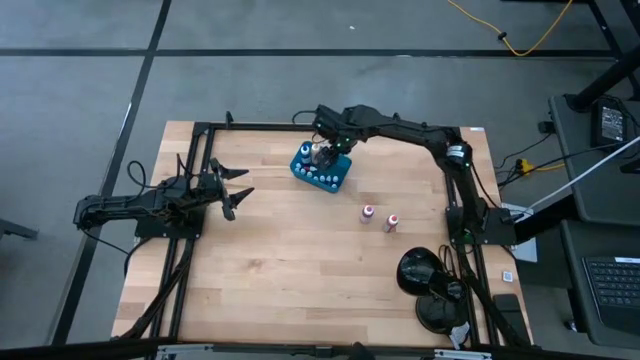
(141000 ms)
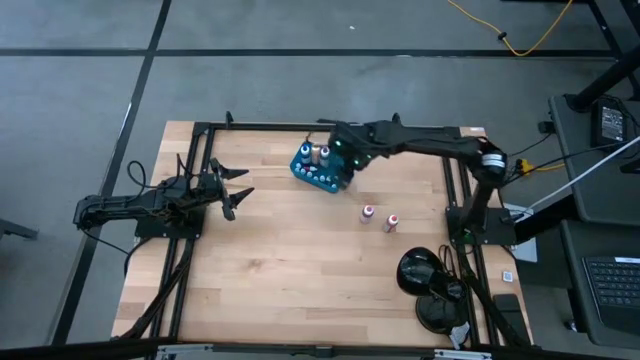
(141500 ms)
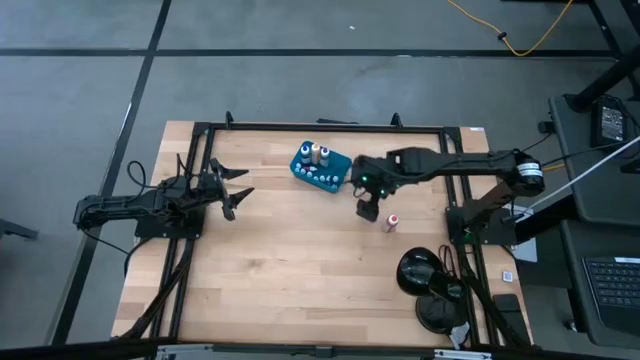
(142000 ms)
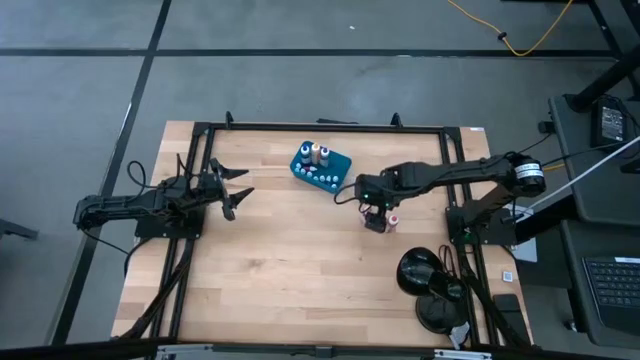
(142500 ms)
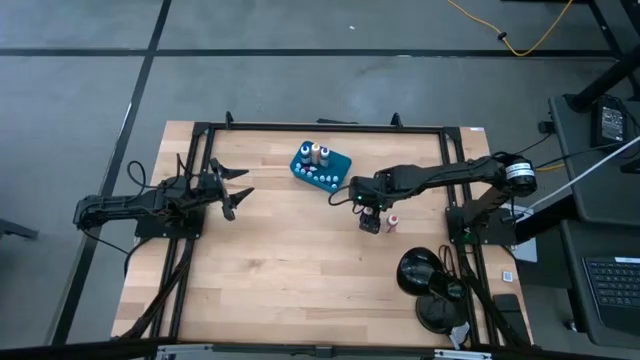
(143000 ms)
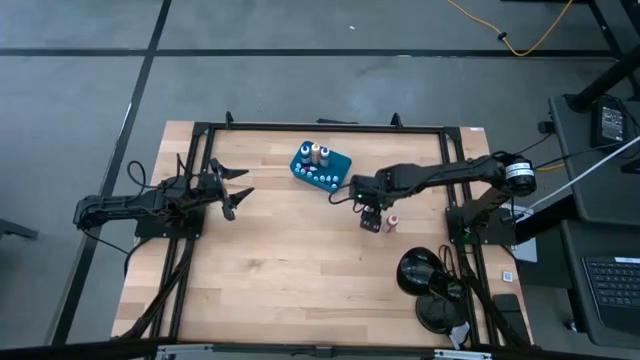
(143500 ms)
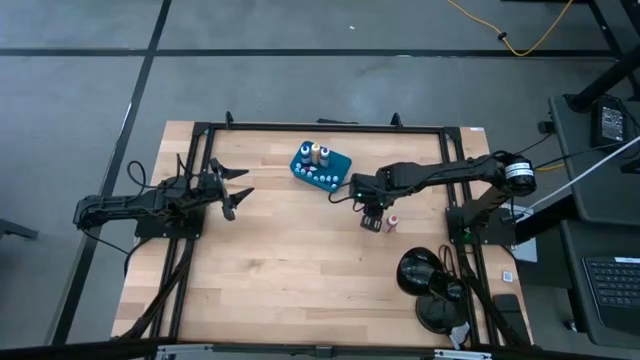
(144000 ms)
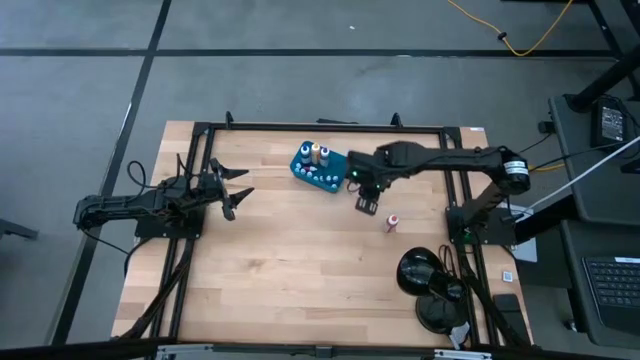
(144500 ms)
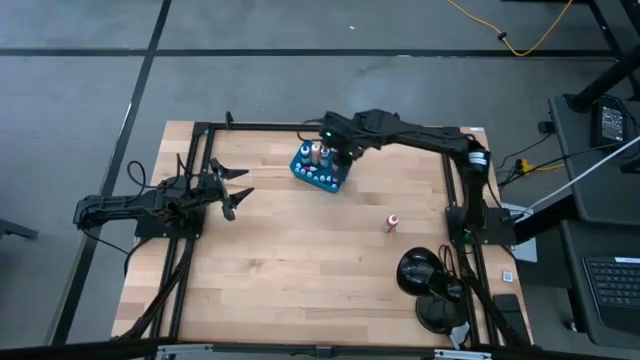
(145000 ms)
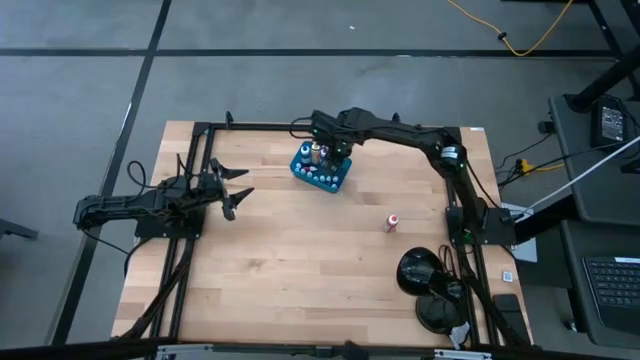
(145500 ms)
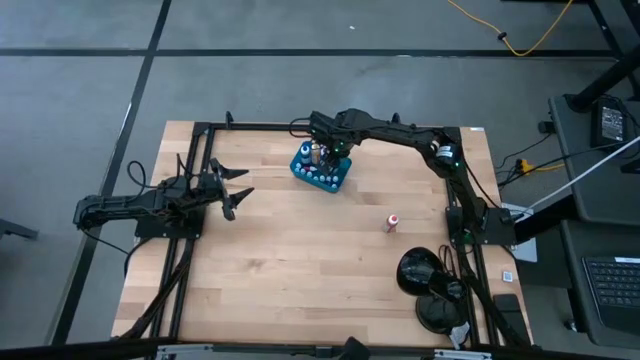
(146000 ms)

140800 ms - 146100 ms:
Task: Pick & Place food coloring
Put the large pink food coloring bottle into the blue bin

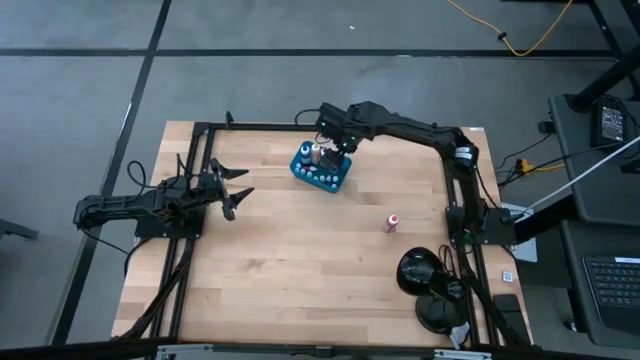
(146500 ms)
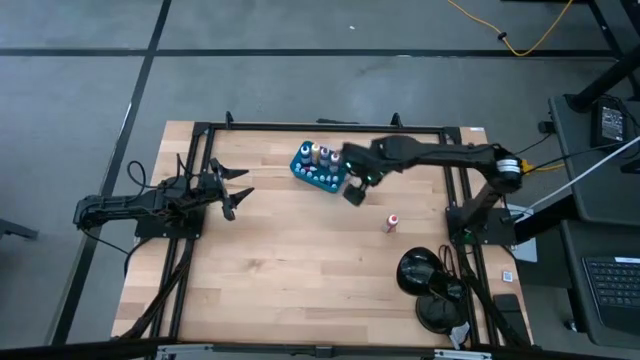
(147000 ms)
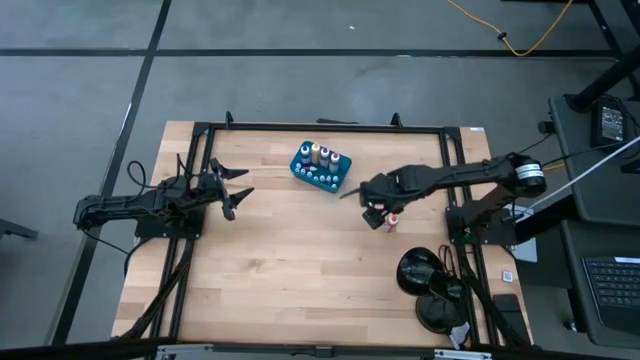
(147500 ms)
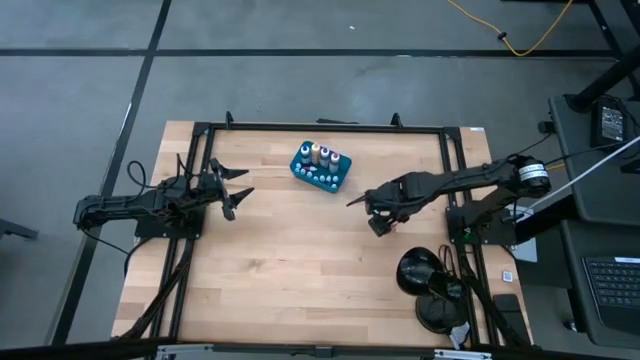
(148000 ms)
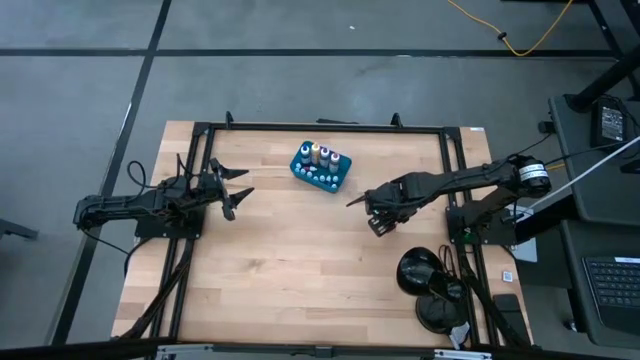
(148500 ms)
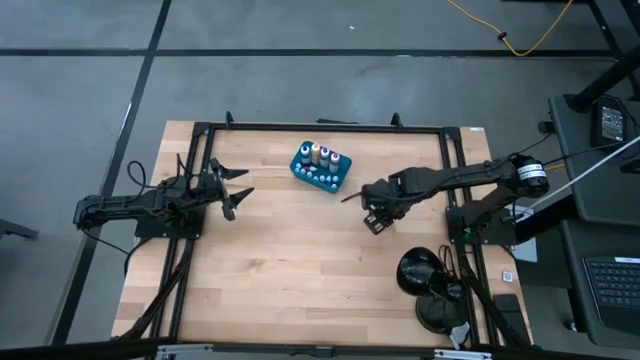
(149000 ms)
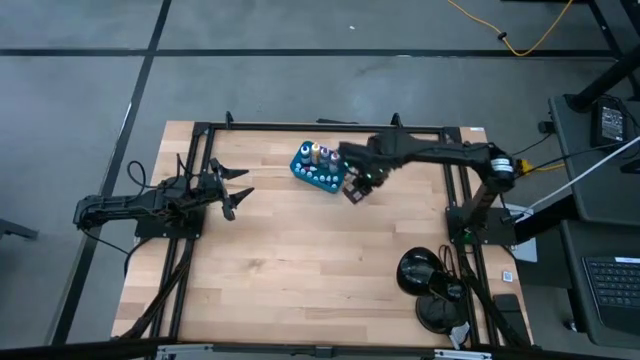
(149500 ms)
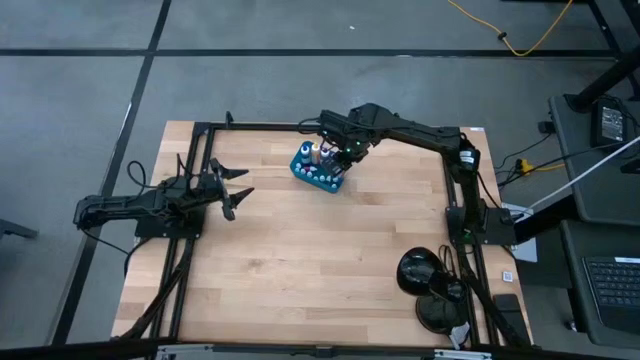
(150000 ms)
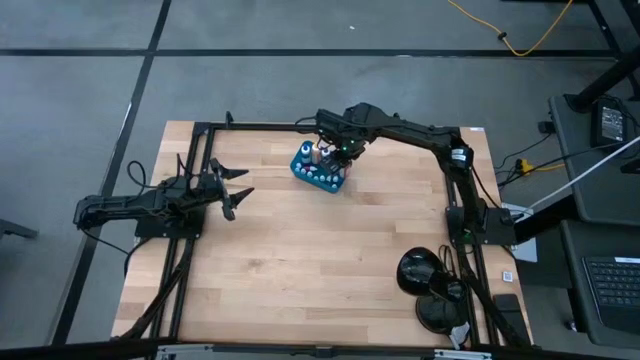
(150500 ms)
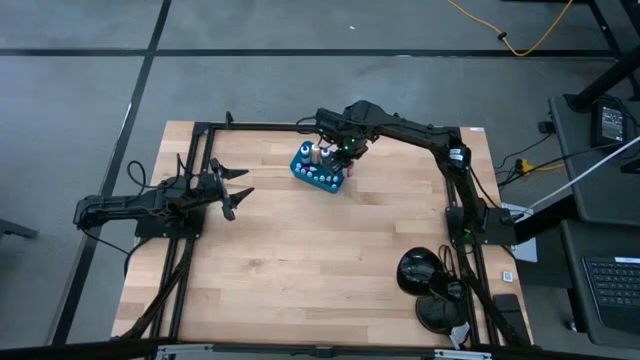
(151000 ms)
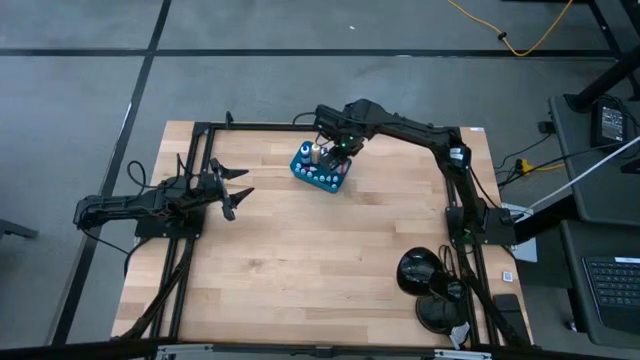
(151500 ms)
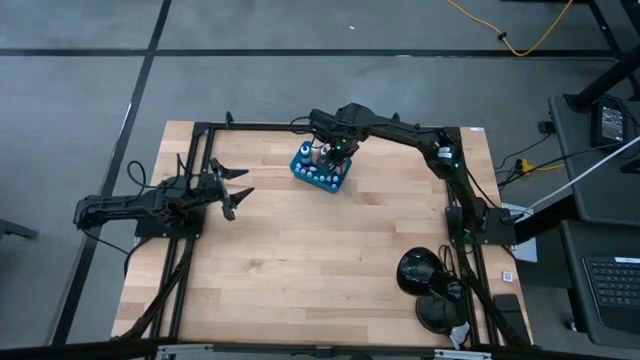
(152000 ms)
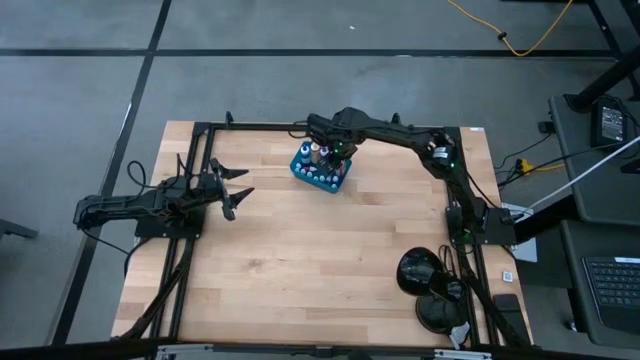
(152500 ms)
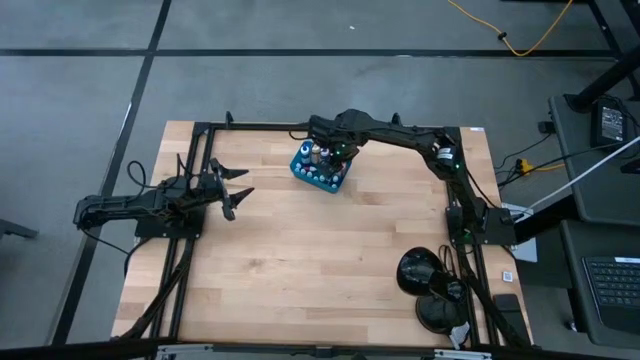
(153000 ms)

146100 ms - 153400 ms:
Put the large orange food coloring bottle into the blue bin

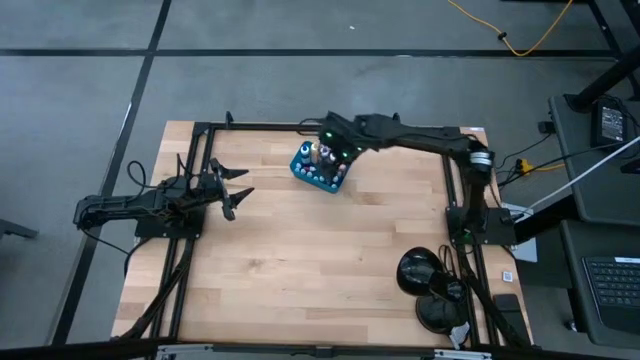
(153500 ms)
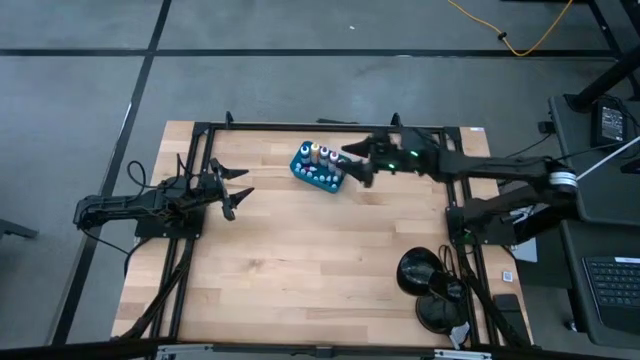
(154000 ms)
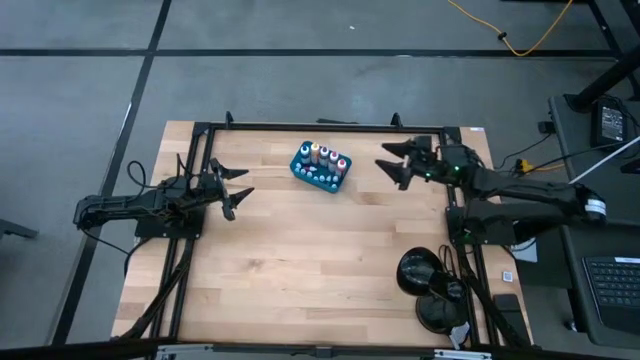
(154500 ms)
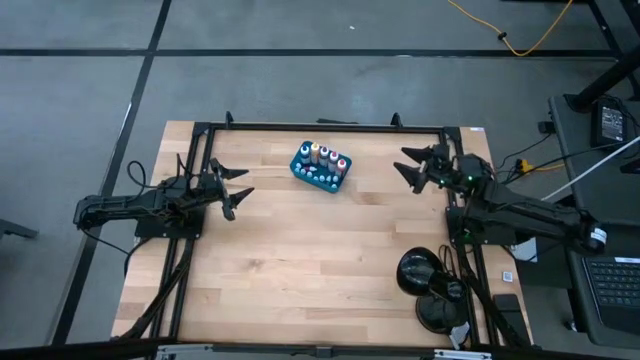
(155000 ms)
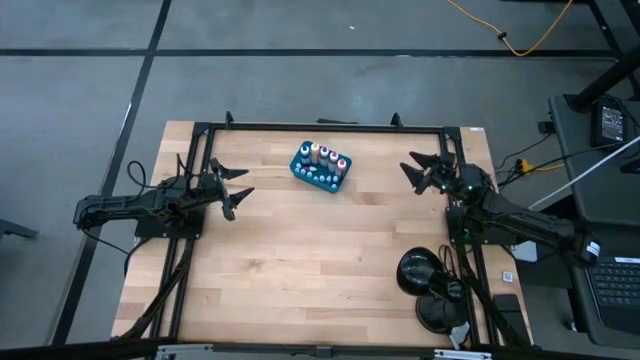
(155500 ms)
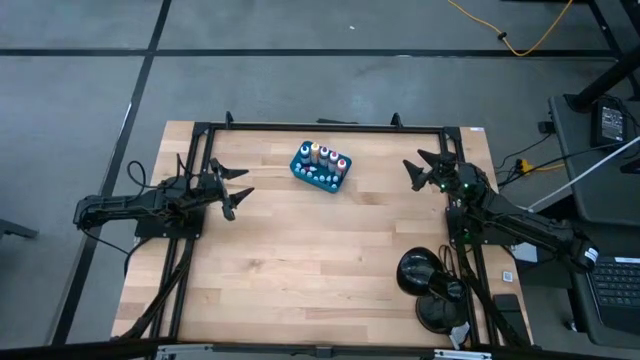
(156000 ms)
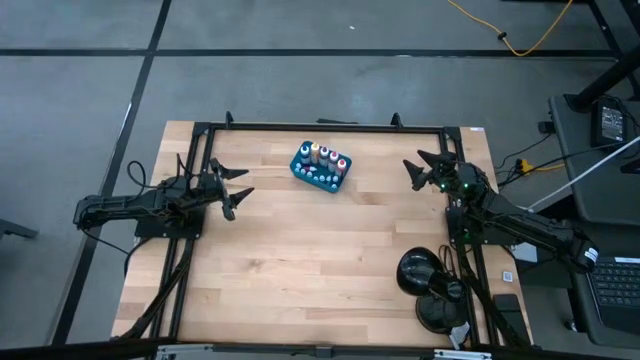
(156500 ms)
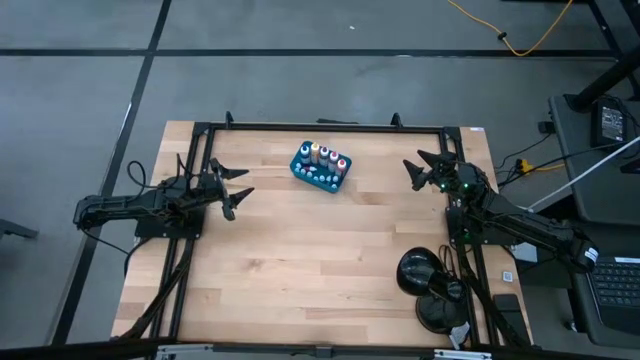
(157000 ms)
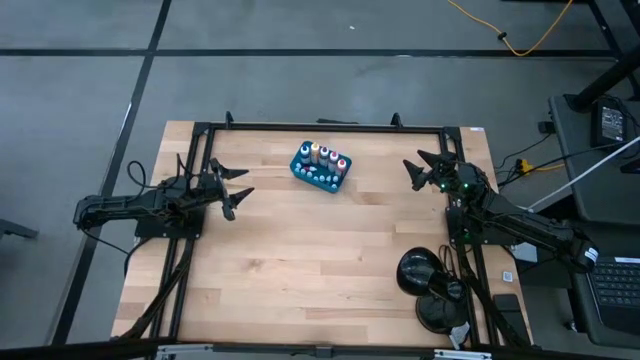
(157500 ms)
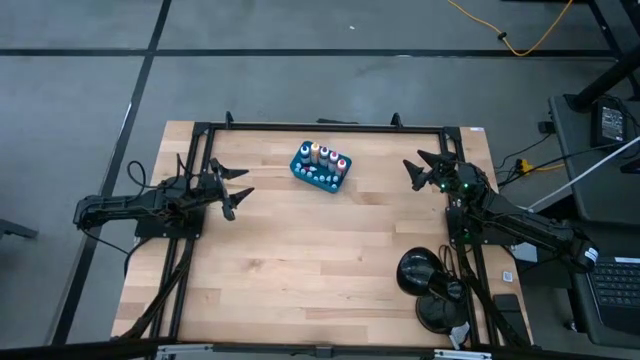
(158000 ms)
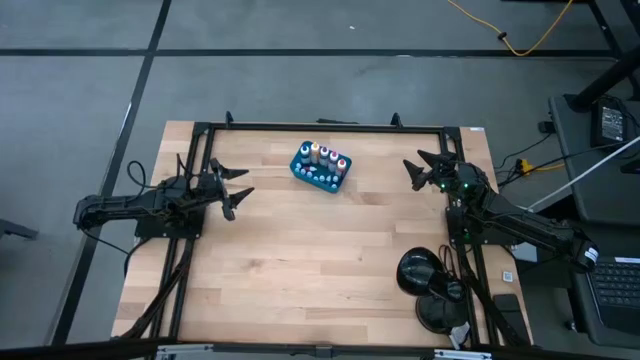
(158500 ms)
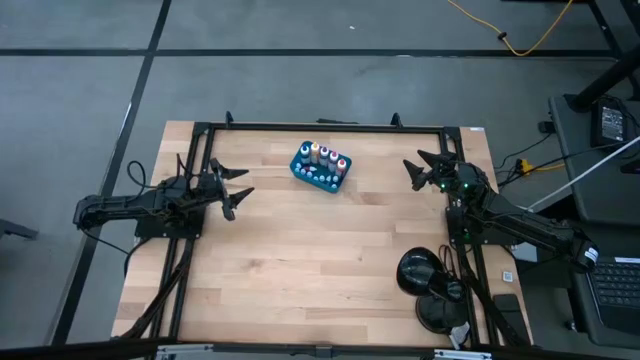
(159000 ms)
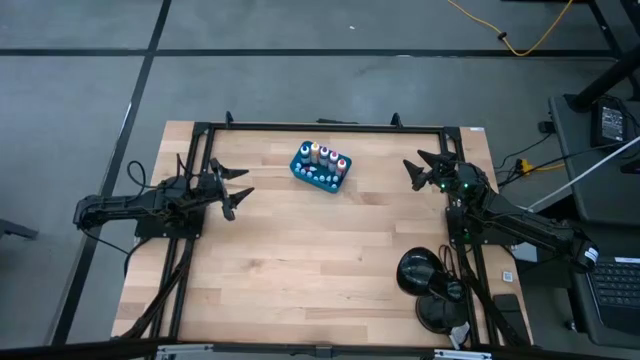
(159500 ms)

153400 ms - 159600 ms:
Return to Home Position

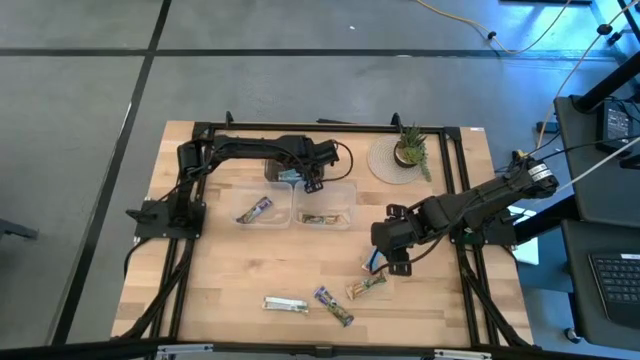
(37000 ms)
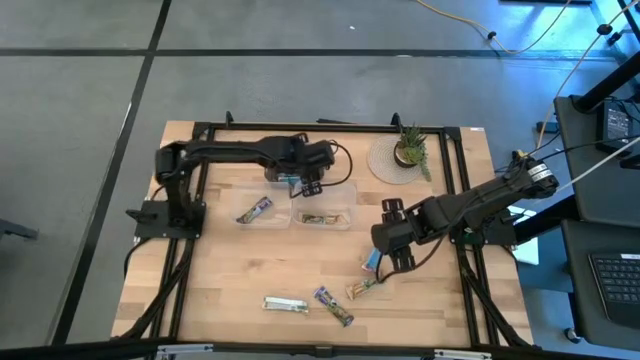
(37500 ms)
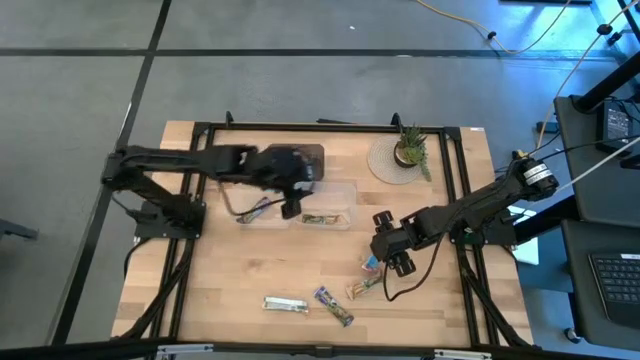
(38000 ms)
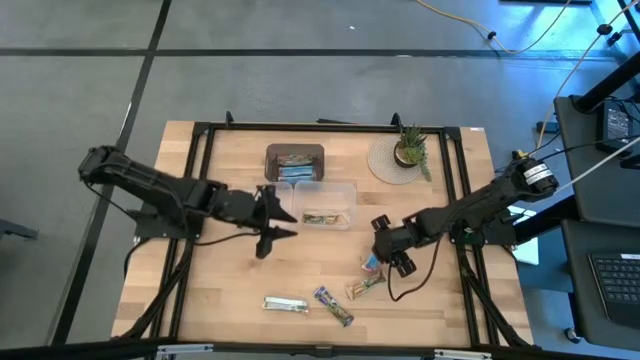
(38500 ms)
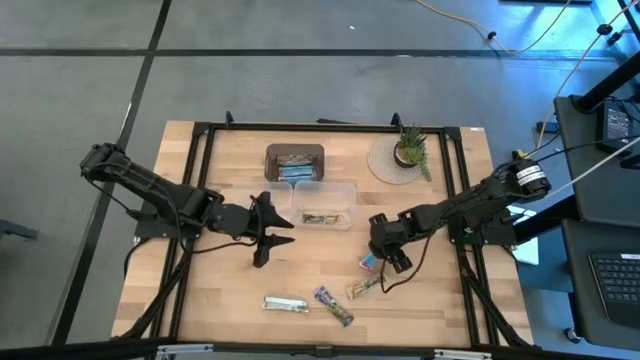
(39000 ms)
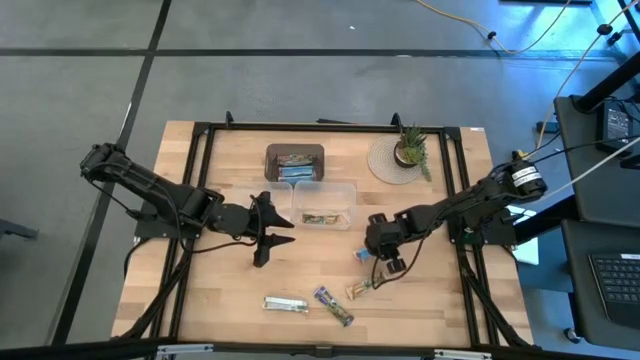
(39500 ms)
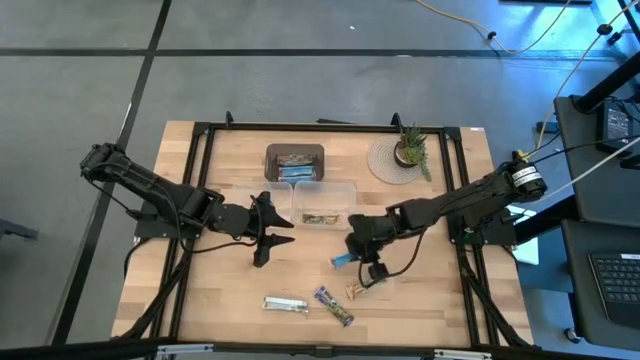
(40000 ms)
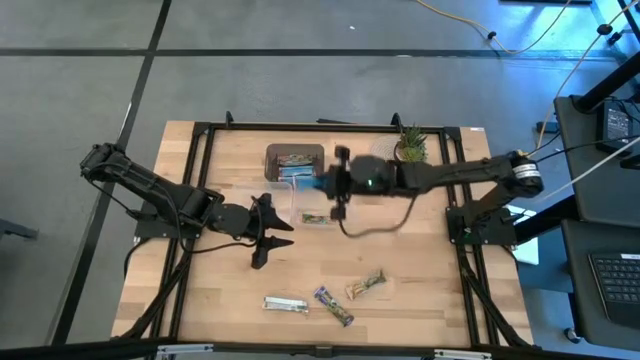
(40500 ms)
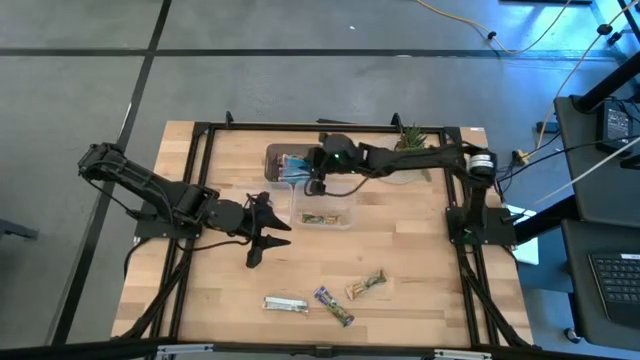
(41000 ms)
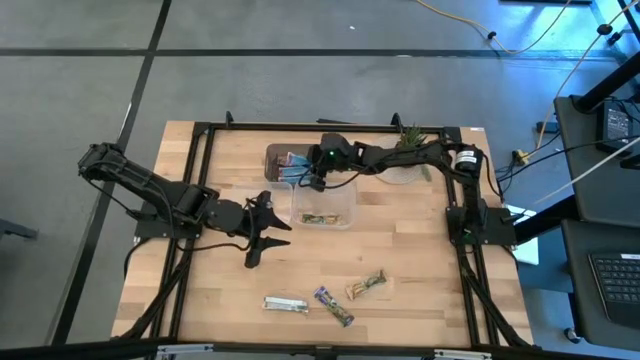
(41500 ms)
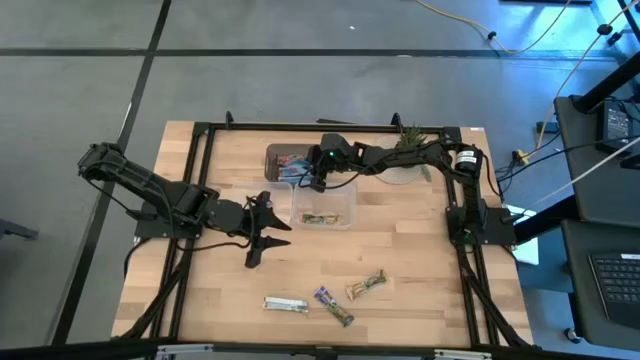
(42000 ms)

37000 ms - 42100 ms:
Task: Pick and place Granola Bars by type
Put the red granola bar into the black bin
